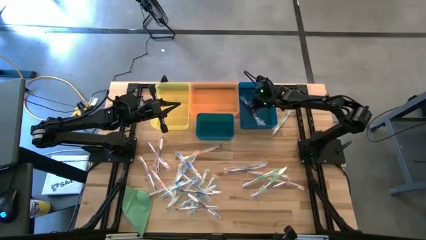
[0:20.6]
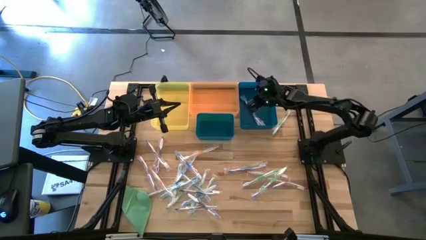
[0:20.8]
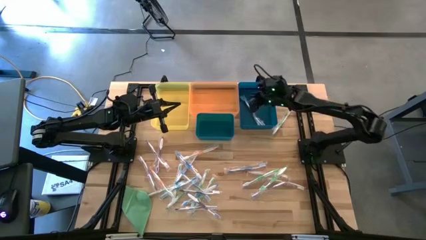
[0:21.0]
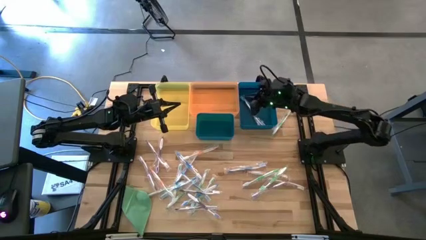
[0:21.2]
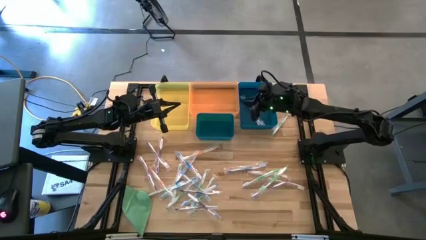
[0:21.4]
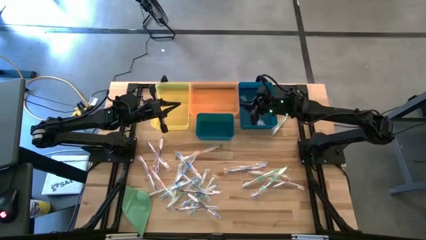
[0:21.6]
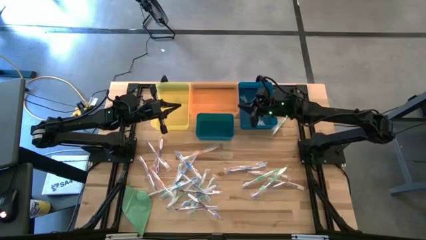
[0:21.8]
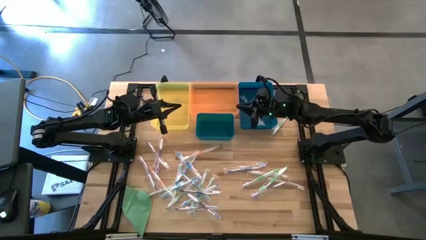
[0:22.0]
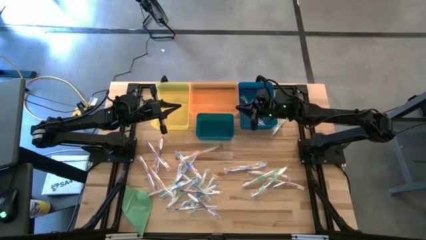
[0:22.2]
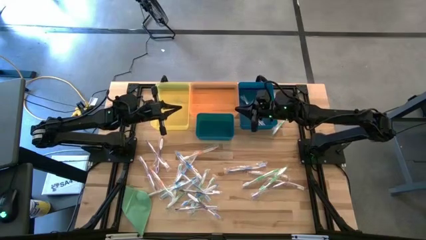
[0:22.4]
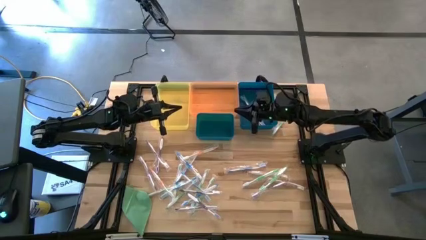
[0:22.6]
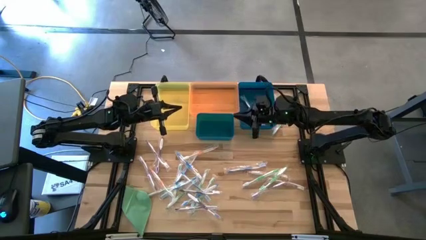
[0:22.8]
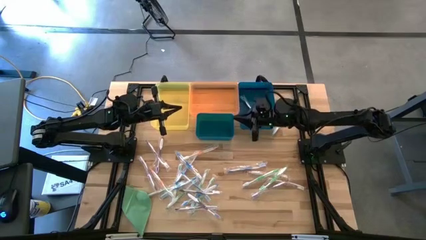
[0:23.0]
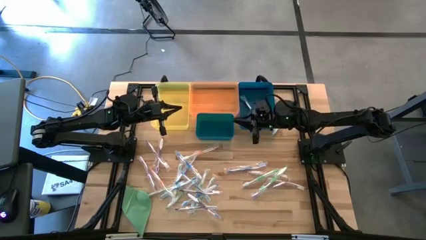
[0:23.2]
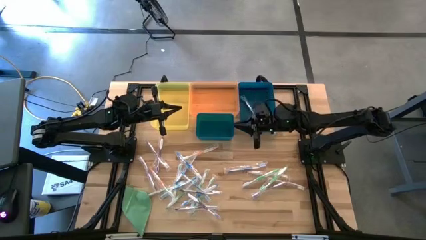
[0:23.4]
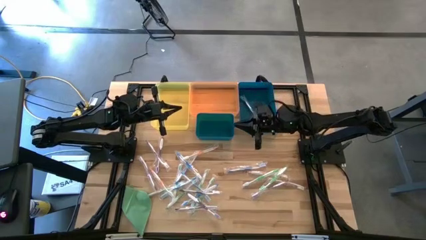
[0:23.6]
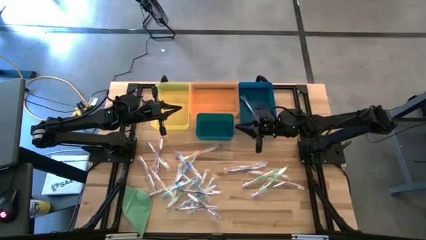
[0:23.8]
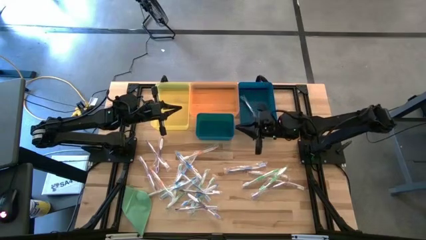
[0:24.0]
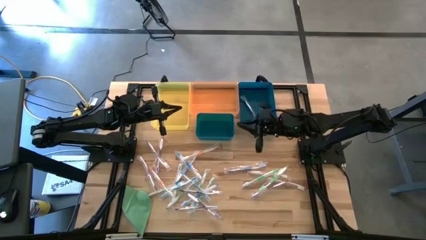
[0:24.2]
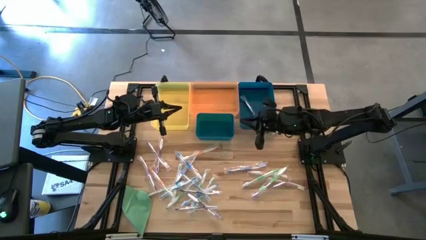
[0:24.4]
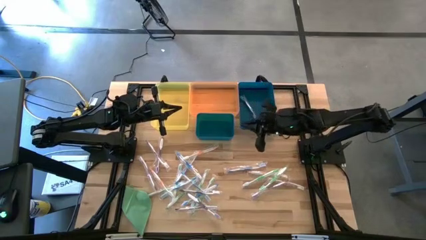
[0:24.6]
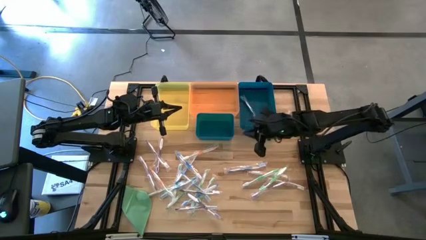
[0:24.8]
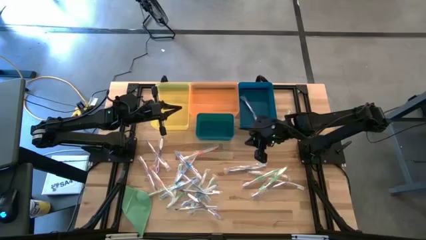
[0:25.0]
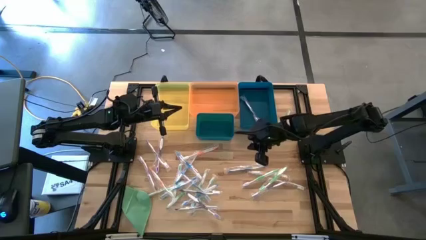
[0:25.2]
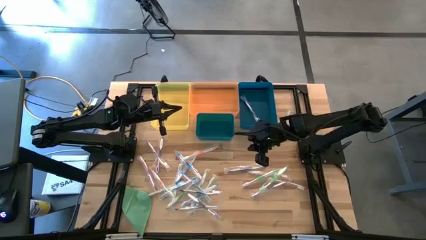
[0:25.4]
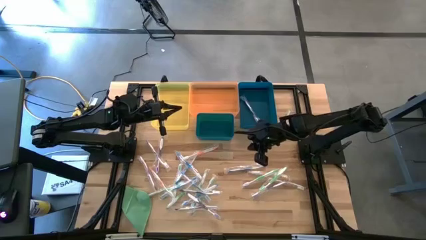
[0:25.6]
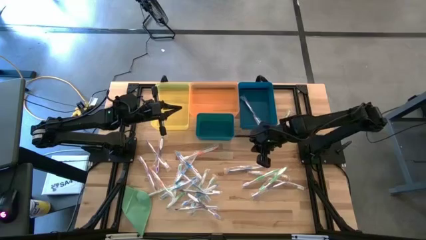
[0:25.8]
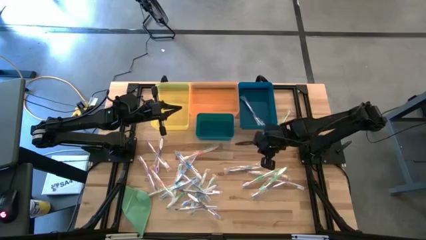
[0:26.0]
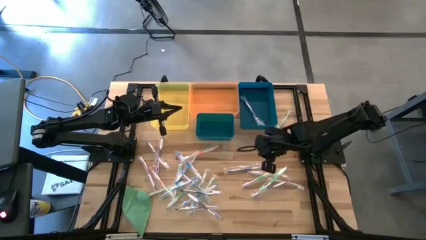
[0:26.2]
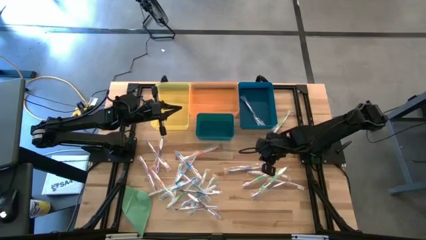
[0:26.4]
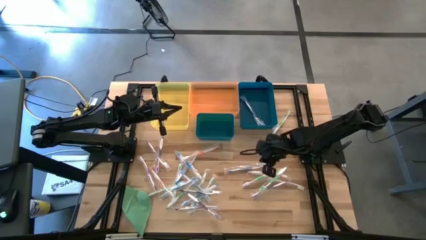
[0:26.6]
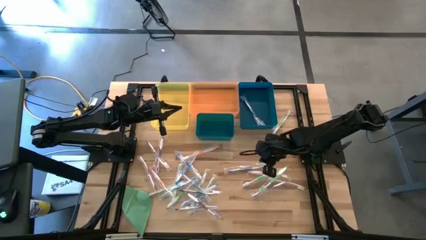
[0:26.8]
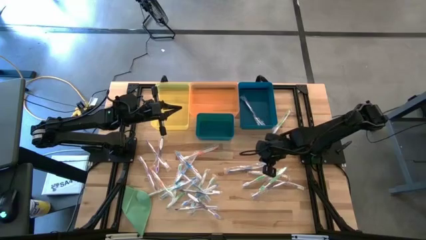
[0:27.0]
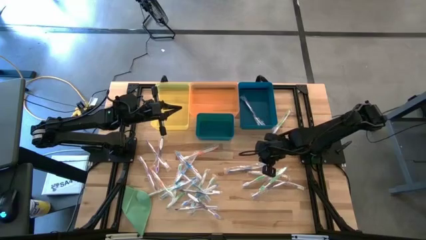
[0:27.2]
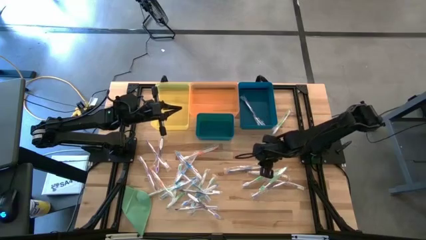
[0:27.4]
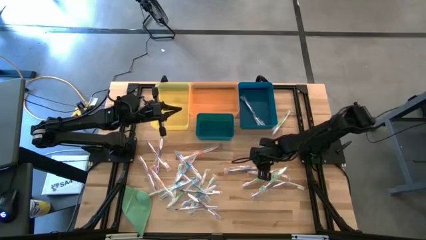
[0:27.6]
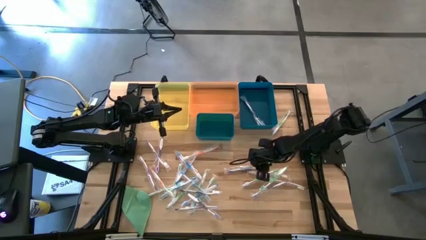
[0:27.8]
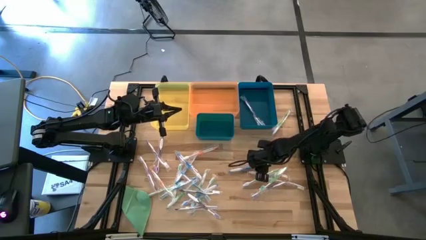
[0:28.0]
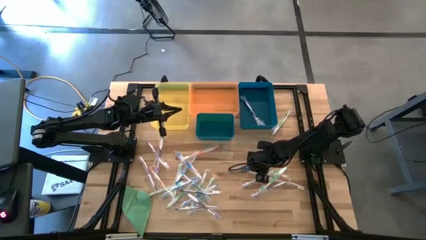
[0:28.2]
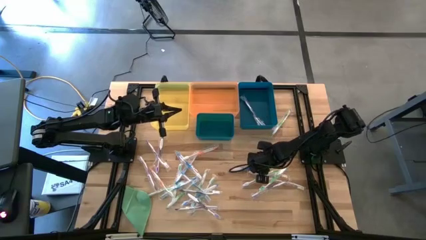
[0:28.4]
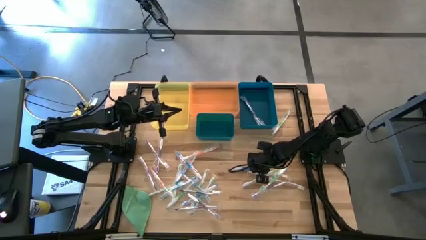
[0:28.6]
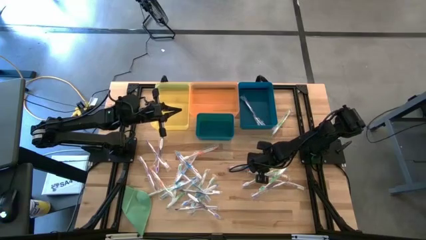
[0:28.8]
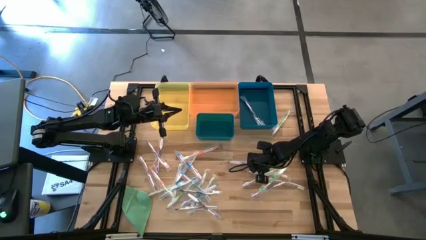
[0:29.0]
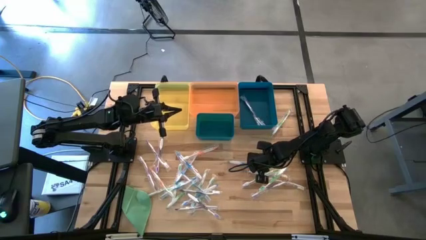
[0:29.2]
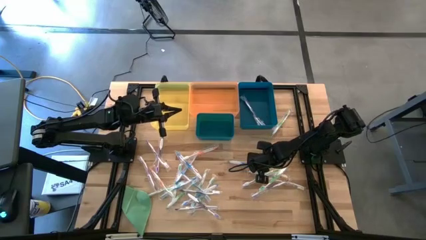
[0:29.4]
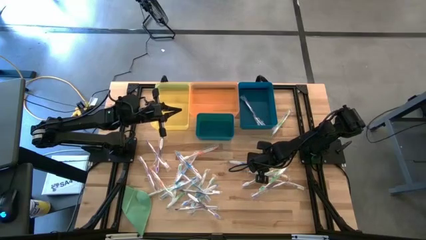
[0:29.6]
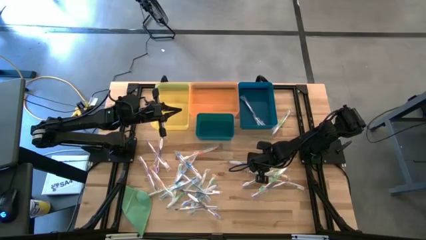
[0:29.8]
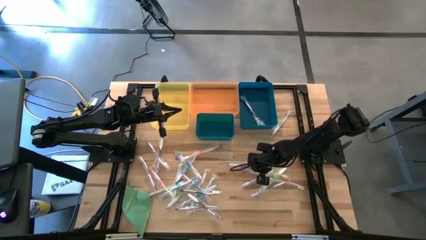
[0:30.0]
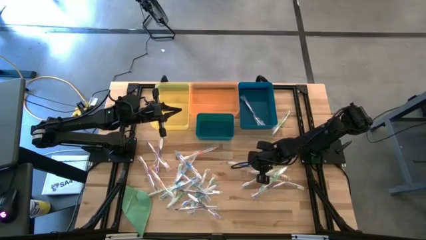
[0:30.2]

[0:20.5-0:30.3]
Task: Pick & Place Toothbrushes
Put the blue toothbrush into the yellow bin

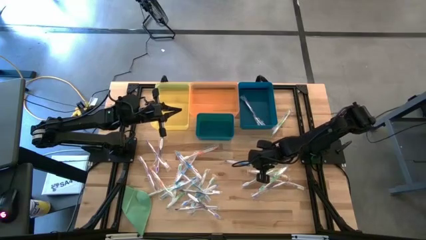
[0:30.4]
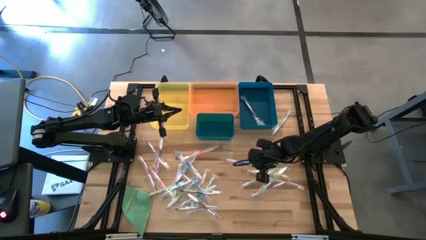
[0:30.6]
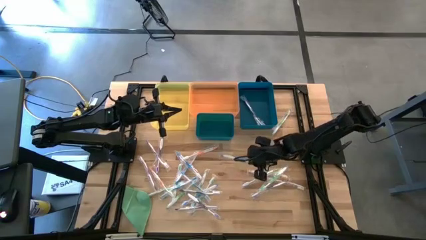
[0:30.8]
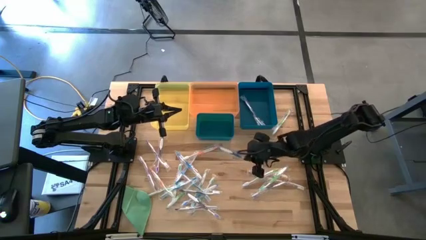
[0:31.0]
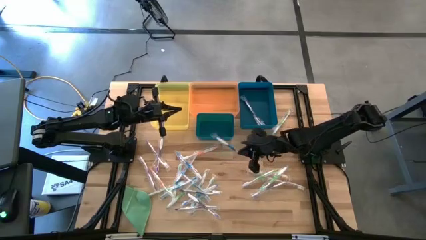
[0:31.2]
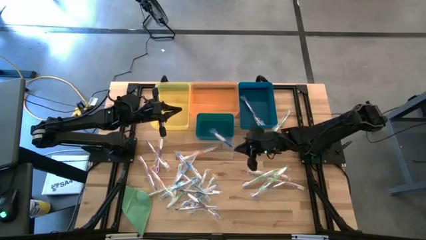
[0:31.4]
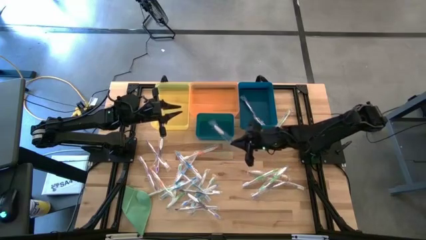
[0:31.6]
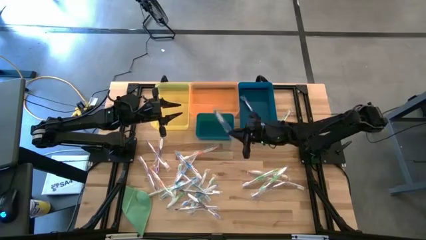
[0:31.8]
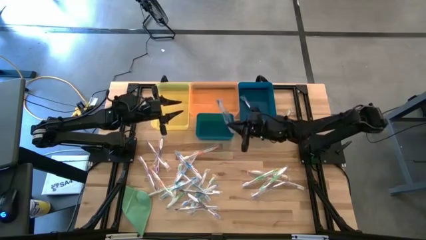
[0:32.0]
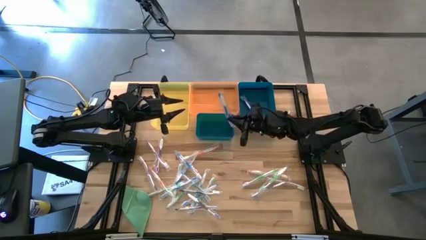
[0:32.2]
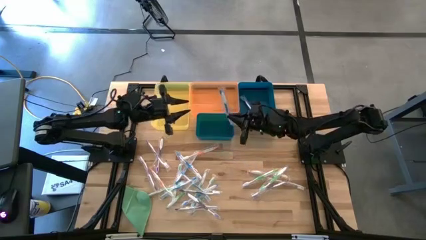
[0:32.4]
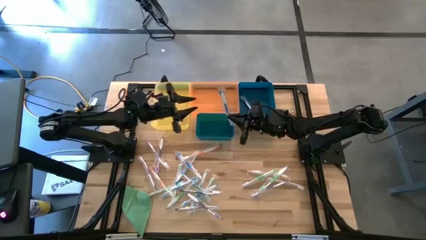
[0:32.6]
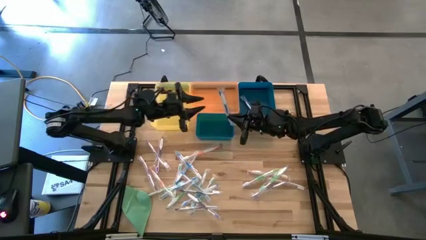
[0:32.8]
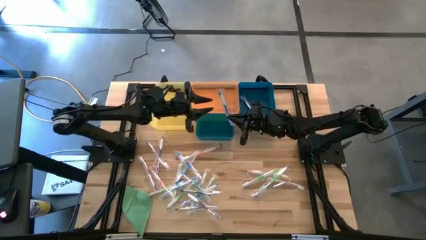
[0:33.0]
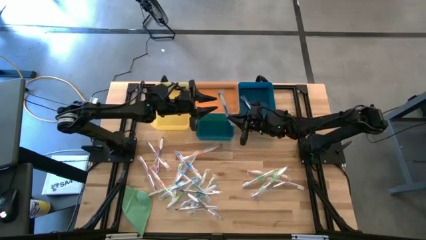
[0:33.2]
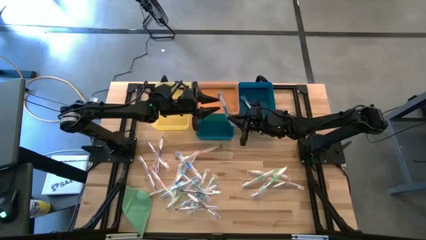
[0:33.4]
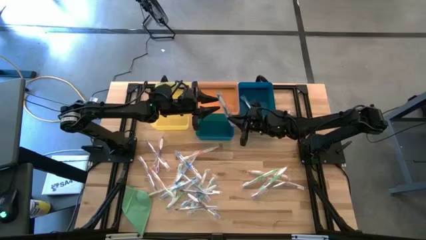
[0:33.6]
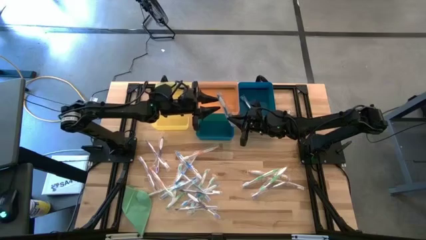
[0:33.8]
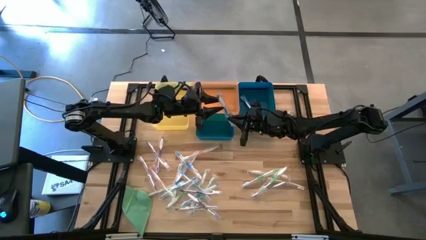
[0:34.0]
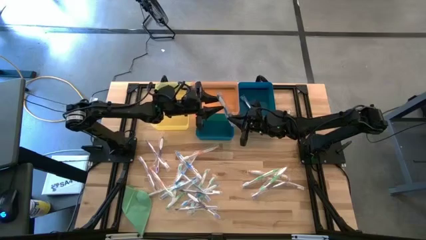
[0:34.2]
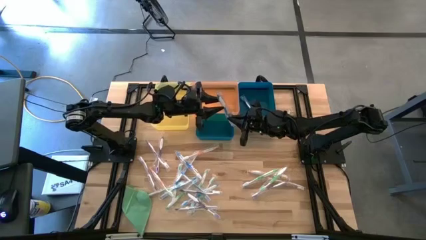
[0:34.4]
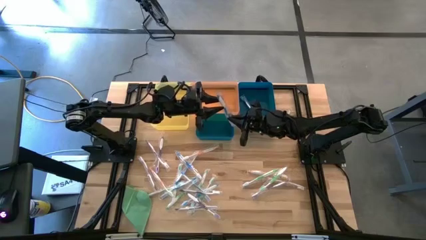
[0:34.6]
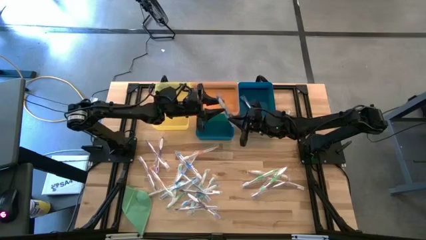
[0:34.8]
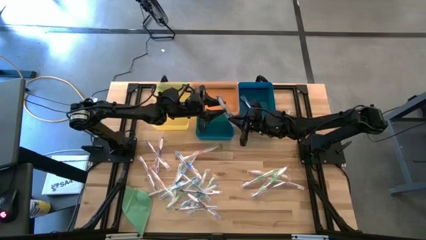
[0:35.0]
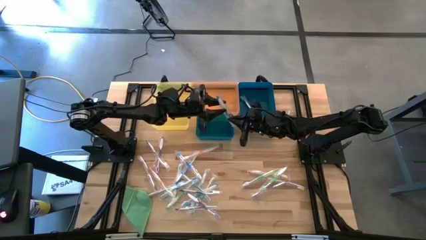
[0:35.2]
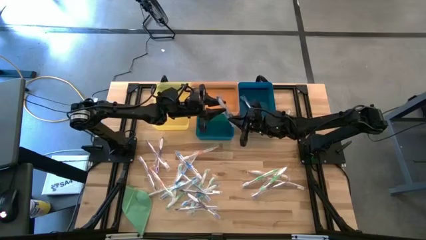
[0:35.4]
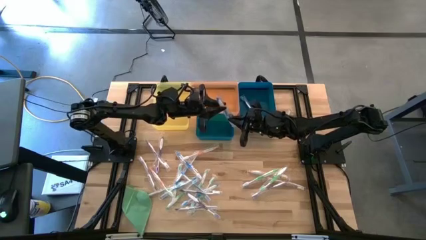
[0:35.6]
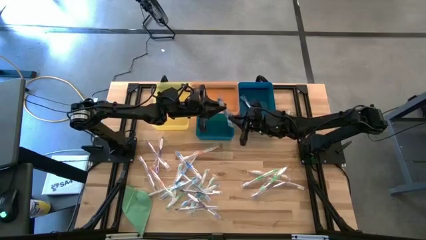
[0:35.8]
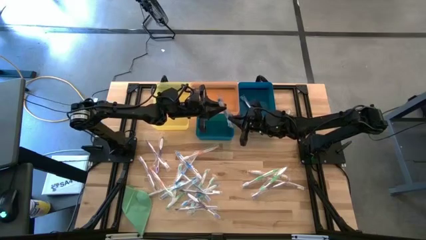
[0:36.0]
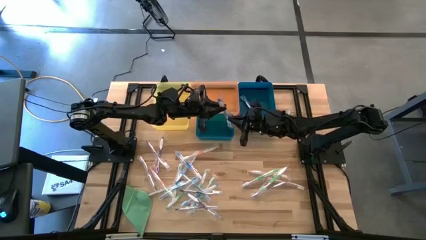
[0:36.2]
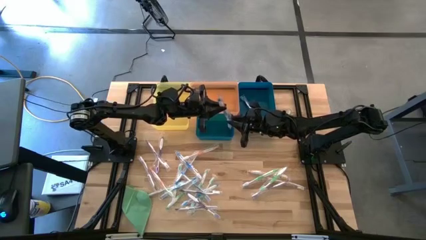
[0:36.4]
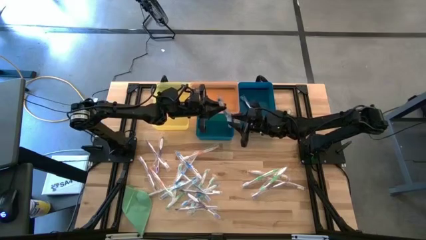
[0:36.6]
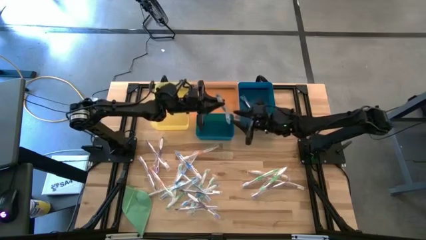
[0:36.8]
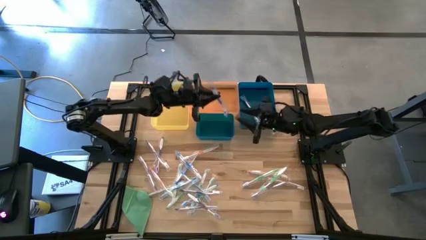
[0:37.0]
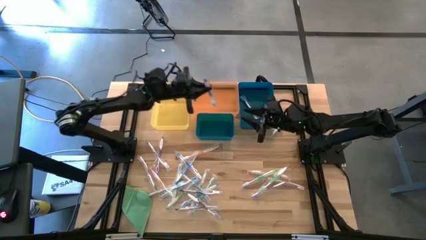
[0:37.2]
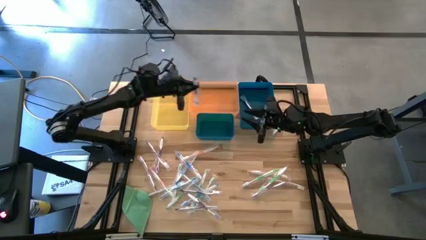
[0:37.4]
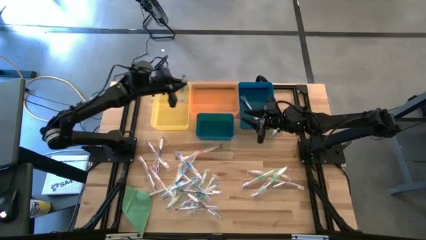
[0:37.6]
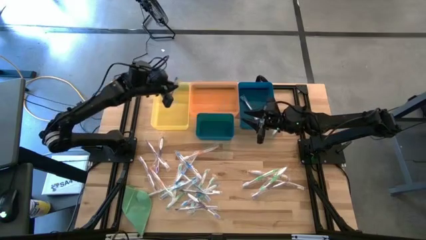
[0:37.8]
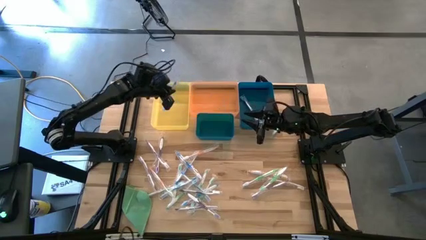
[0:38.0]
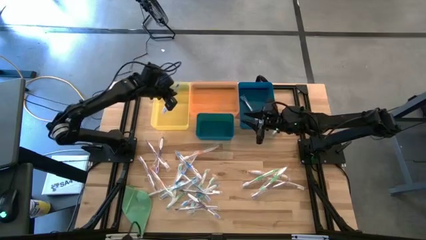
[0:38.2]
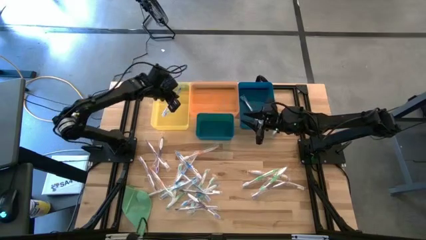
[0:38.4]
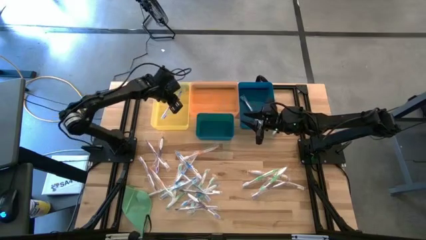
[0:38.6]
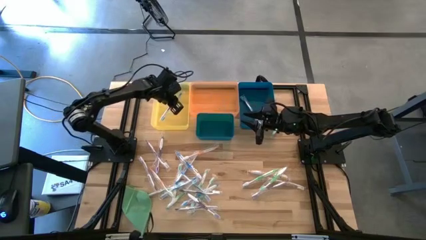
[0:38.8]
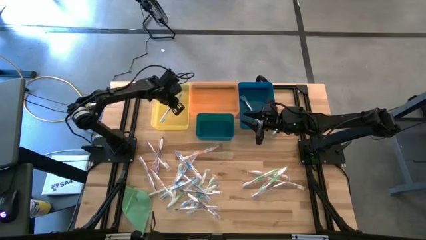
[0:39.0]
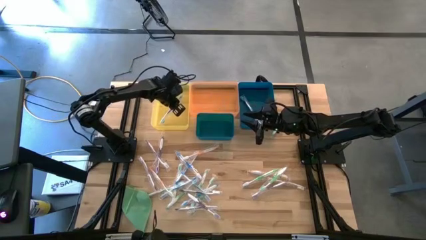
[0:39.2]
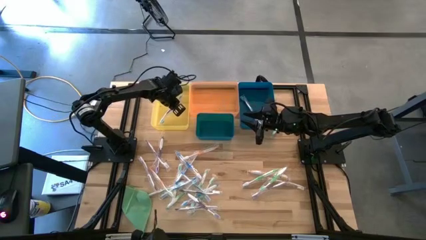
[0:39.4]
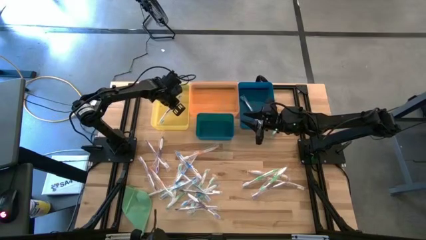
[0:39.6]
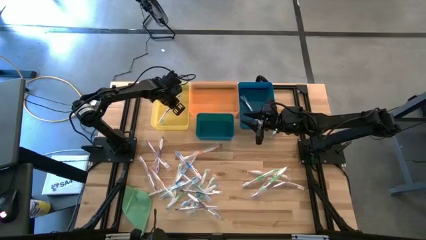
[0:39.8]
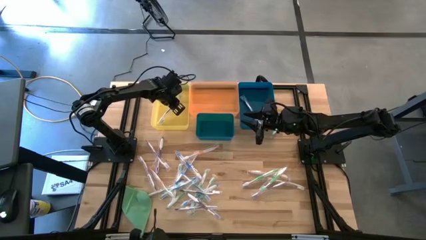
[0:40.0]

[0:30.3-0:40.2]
Put the blue toothbrush into the yellow bin
